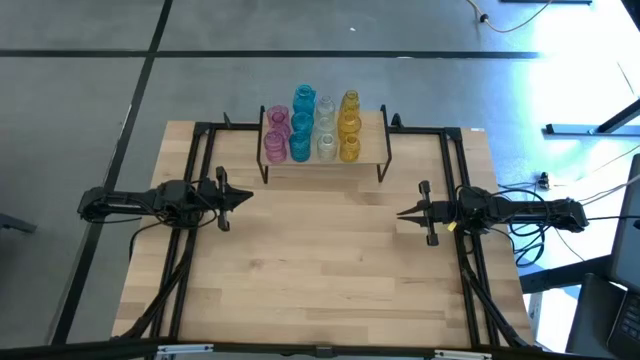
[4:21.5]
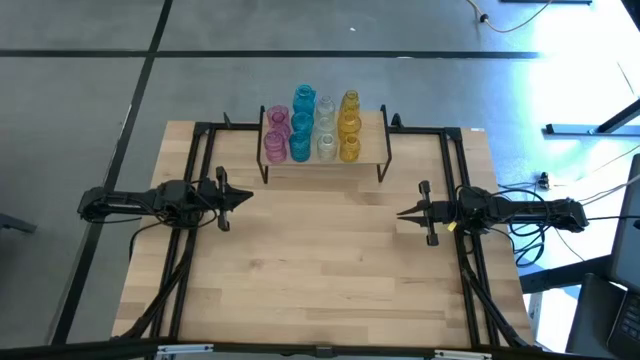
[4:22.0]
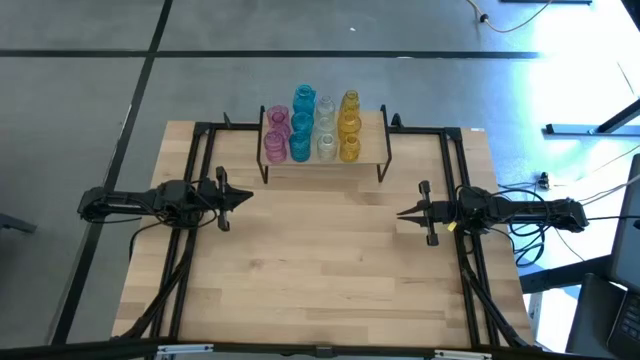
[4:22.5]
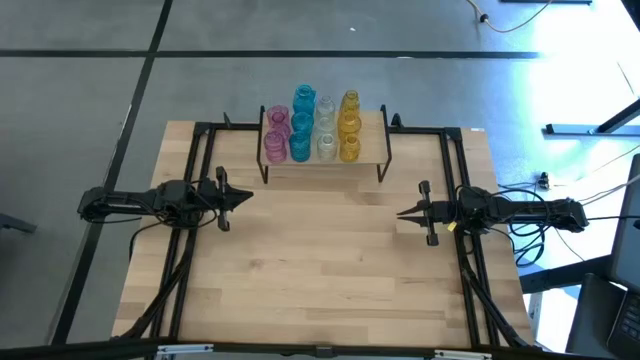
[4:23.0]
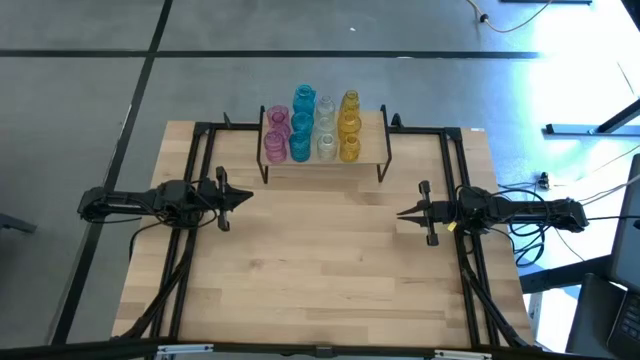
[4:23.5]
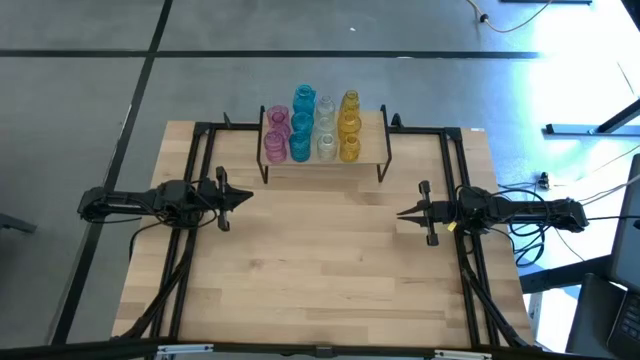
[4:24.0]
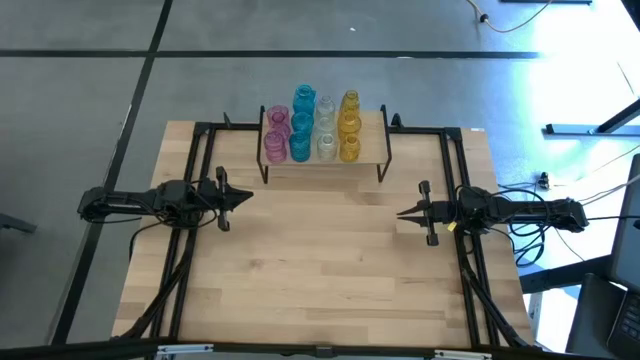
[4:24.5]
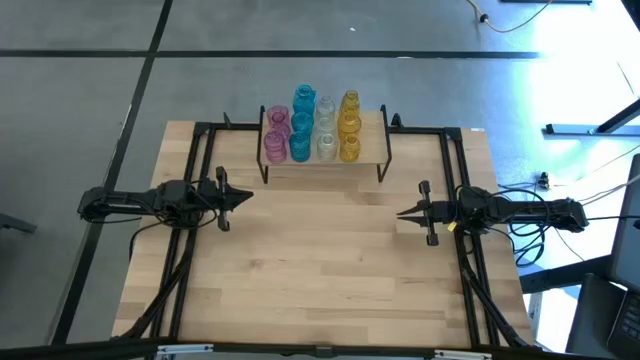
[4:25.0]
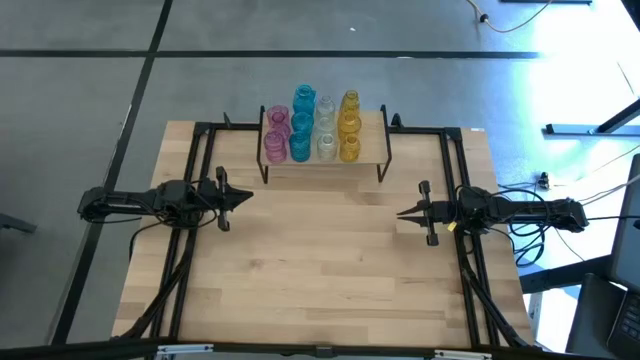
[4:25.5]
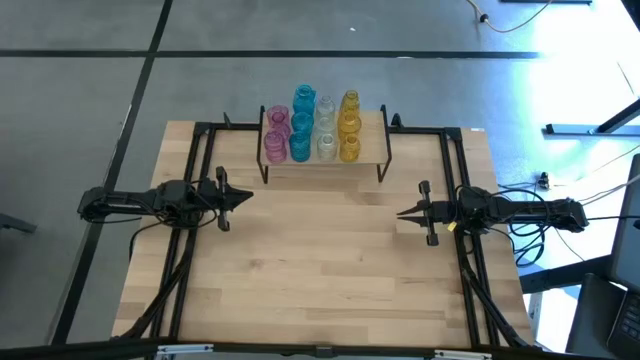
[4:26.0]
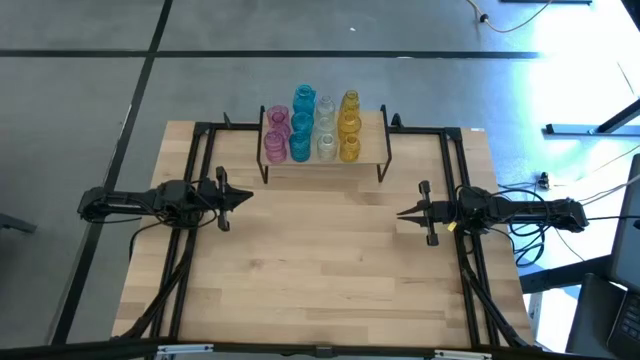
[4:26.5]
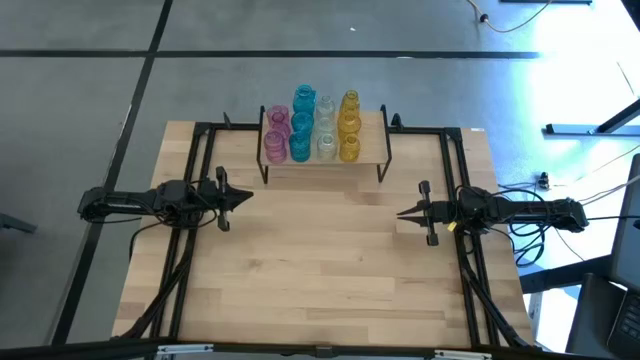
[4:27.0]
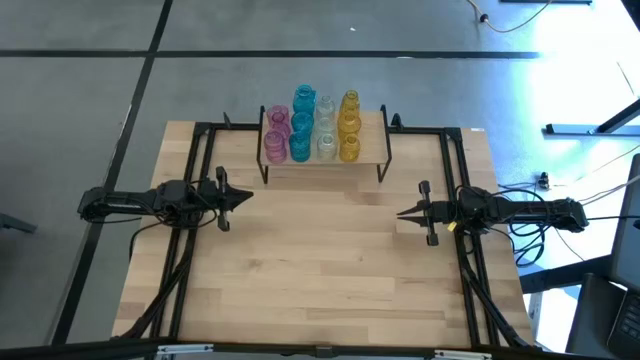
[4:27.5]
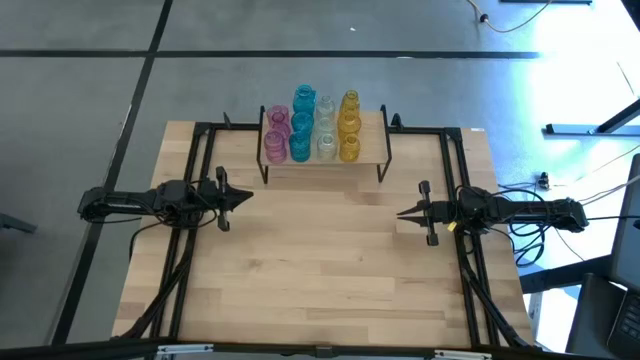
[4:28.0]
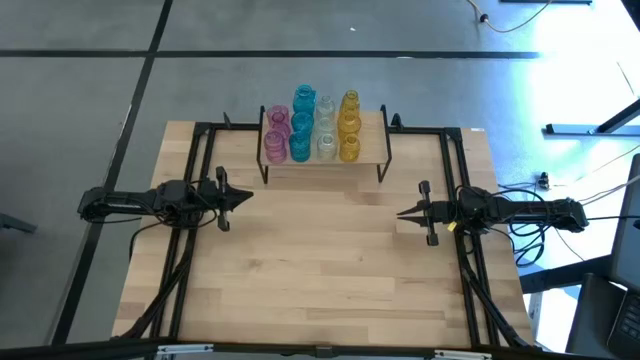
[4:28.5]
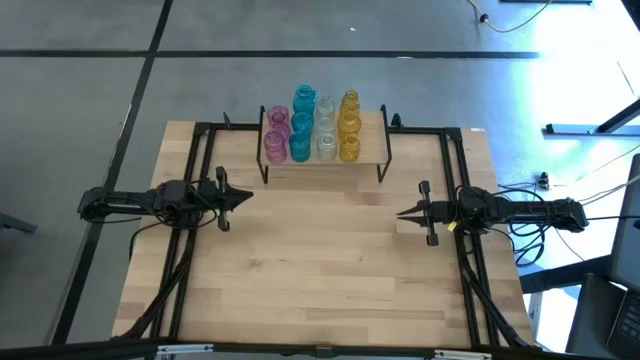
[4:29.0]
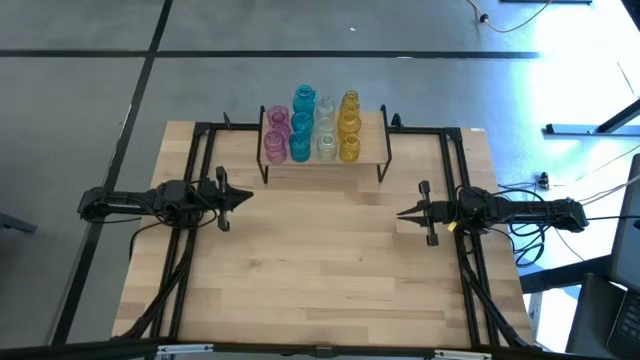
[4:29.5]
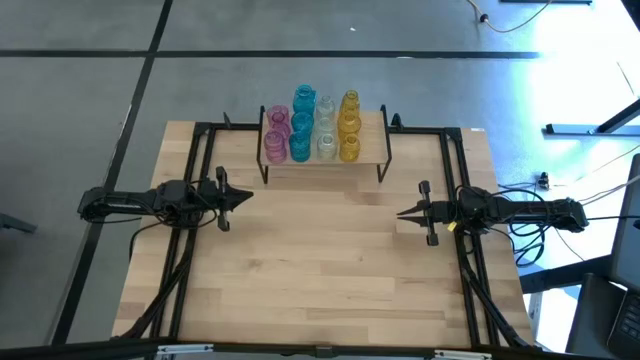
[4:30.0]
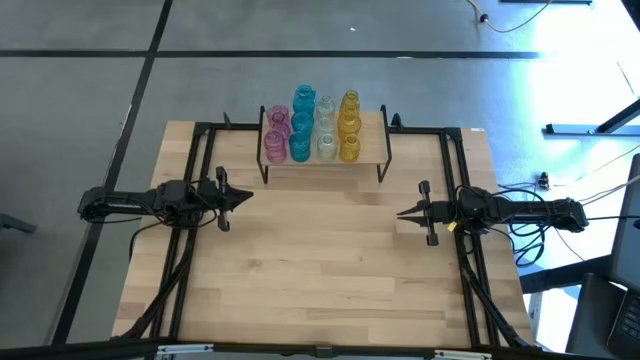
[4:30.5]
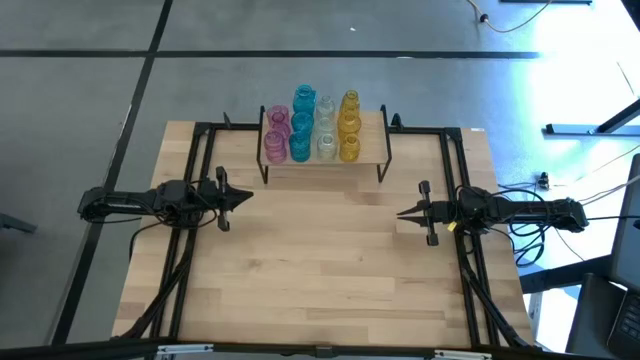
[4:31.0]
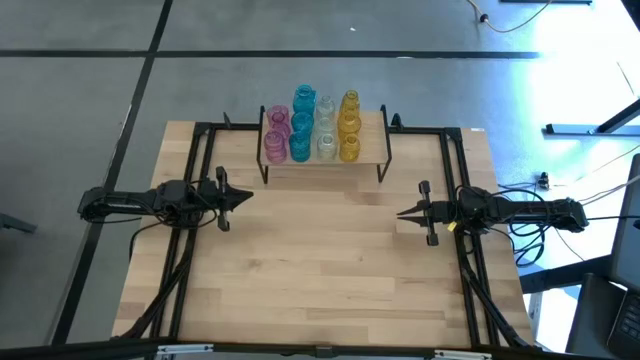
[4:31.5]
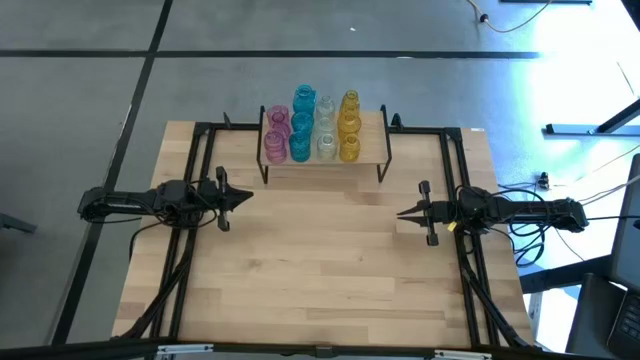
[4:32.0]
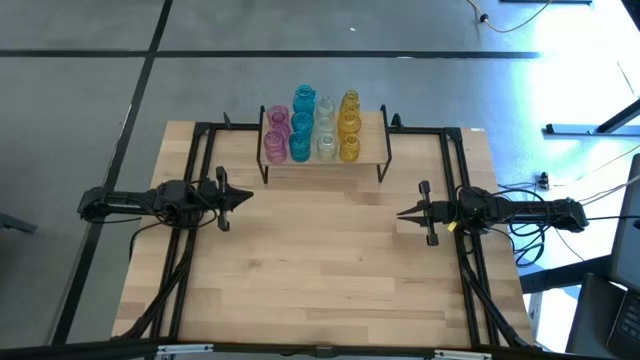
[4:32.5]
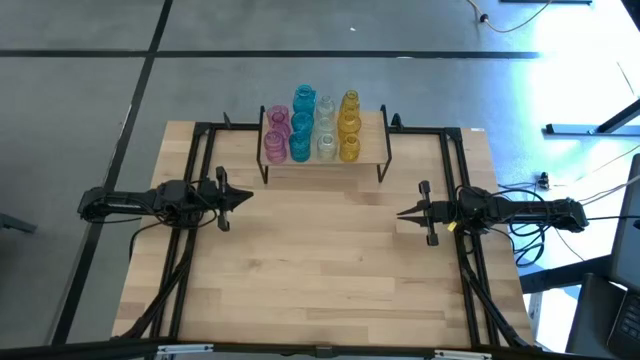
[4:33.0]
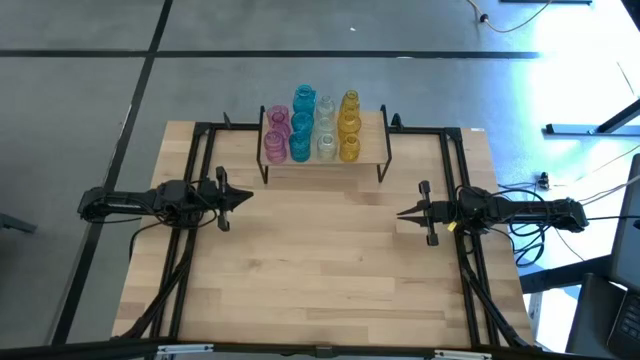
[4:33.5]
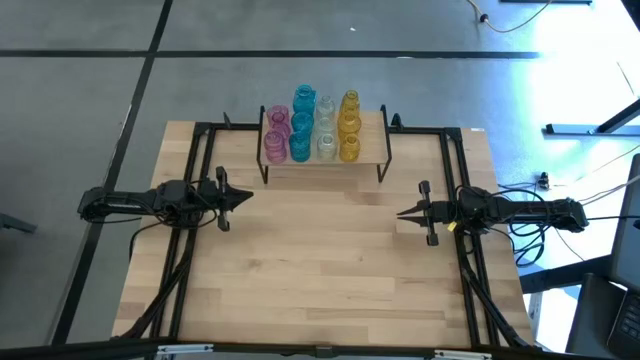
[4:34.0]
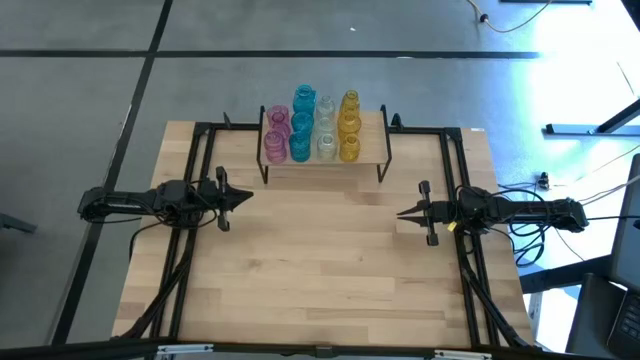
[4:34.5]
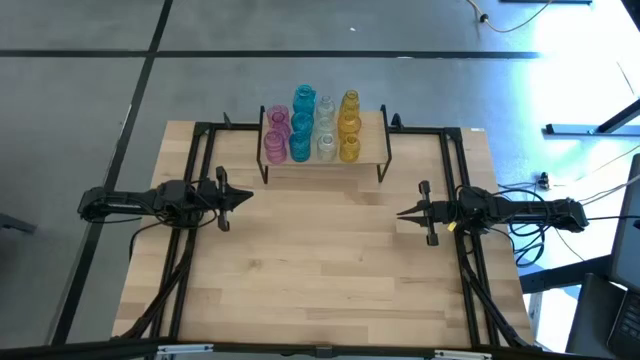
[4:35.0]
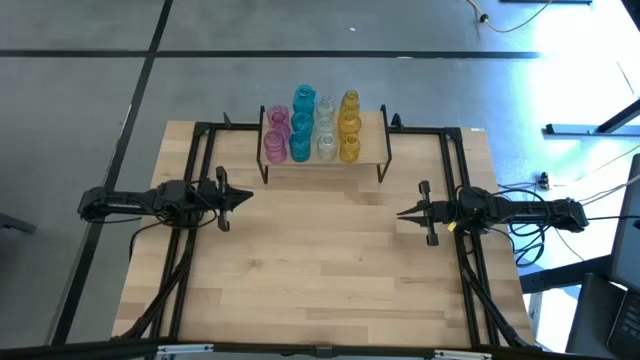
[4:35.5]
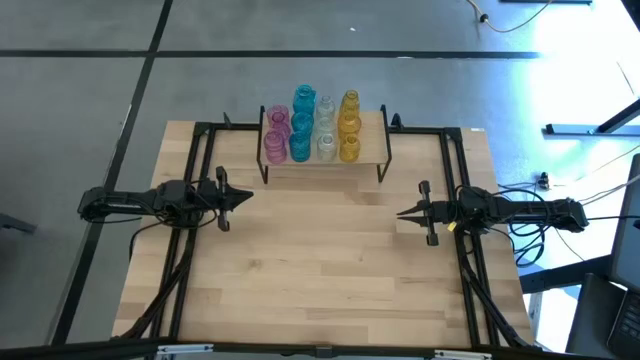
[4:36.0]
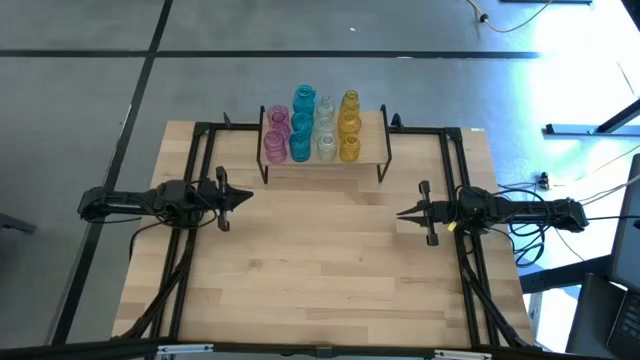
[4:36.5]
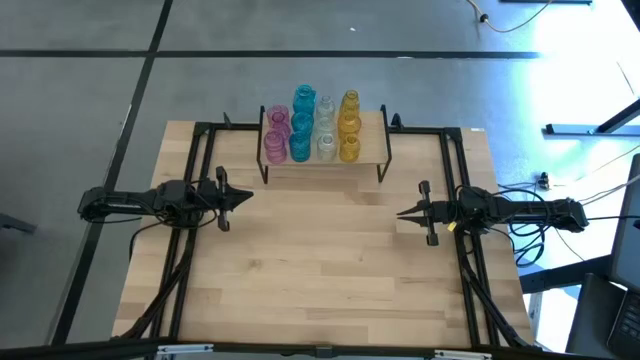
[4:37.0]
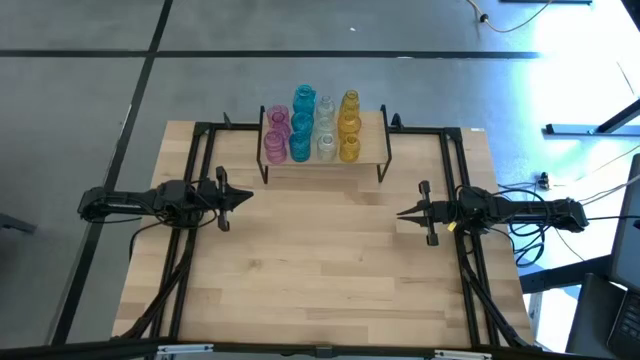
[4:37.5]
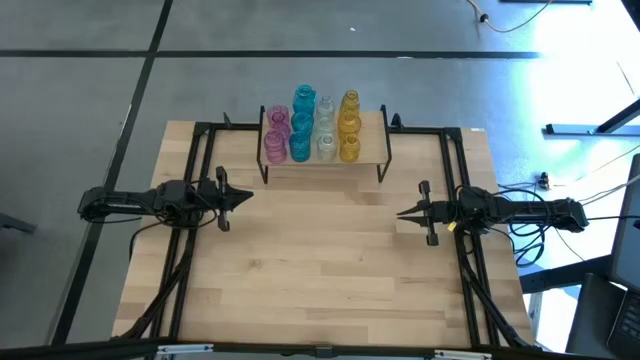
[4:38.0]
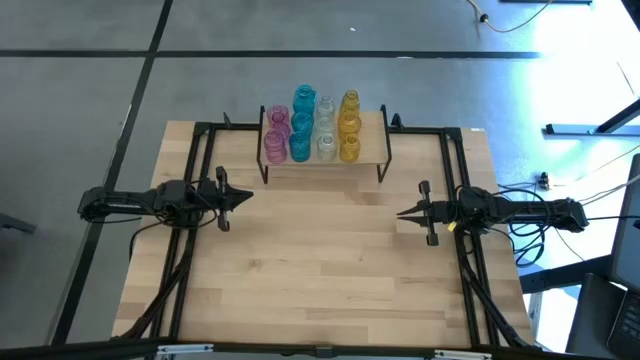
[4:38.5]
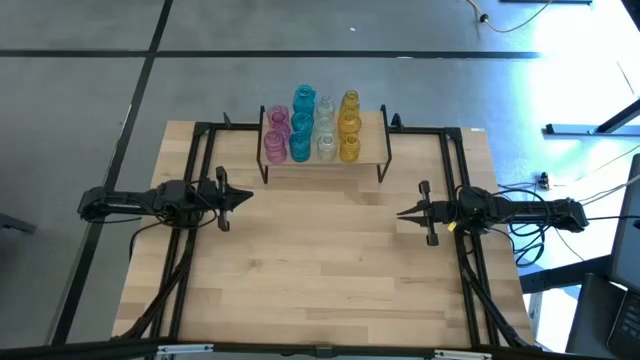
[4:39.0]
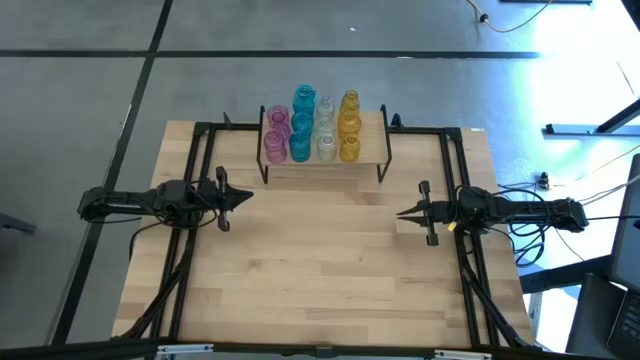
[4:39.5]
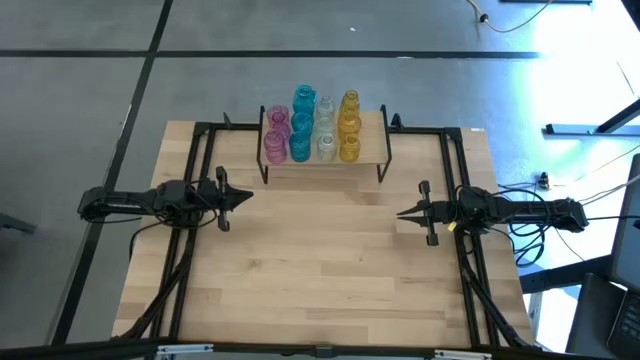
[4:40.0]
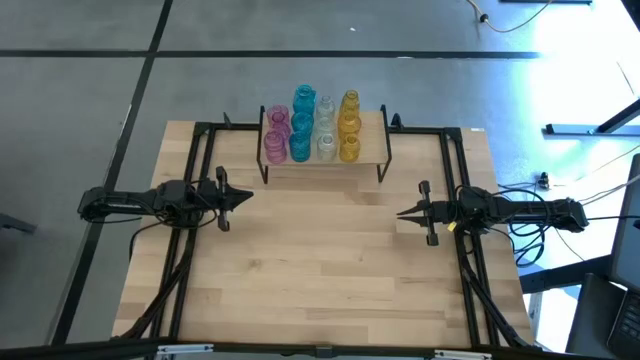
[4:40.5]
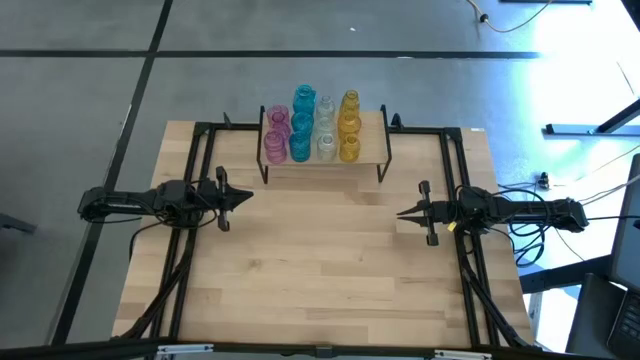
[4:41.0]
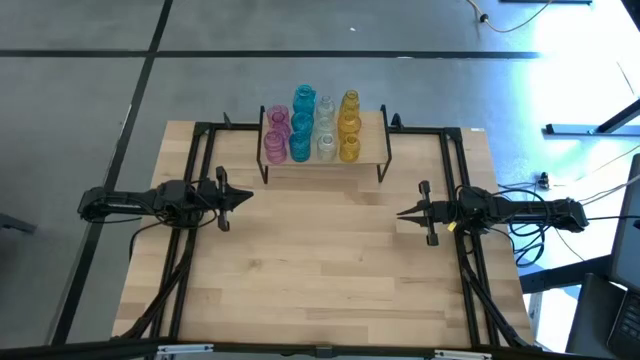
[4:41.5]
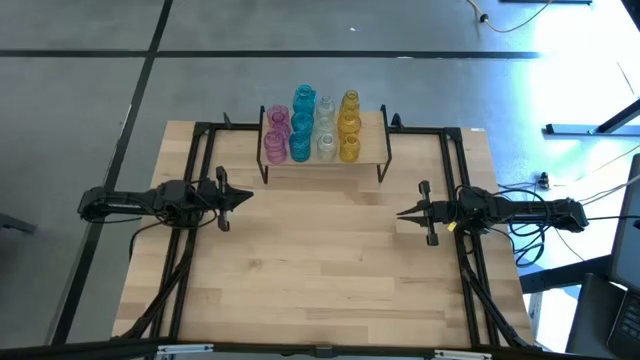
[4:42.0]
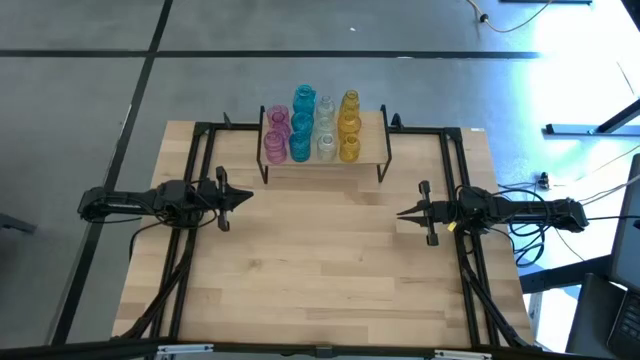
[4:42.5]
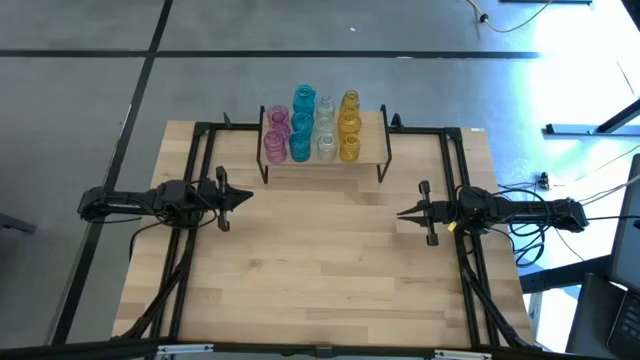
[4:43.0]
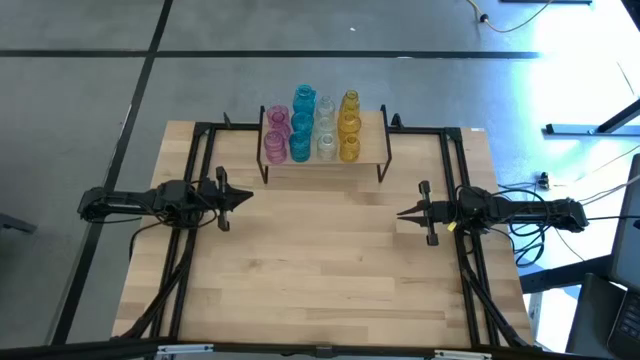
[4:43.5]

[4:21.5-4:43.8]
Task: sort vases onto shelf
Return to Home Position
